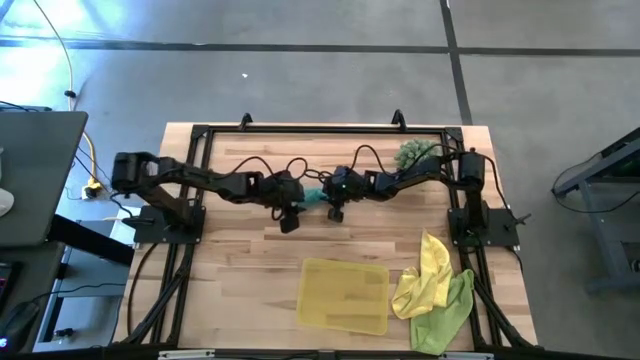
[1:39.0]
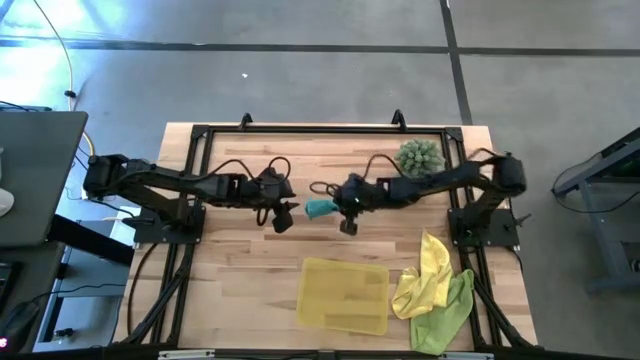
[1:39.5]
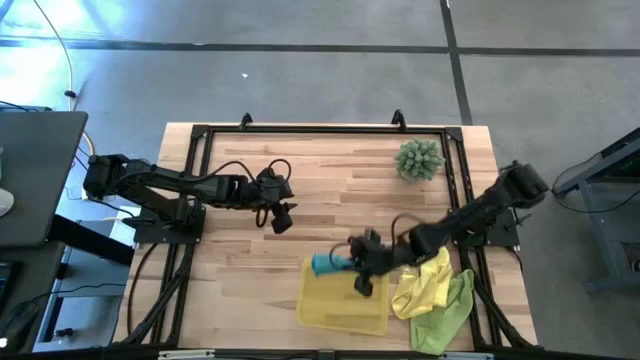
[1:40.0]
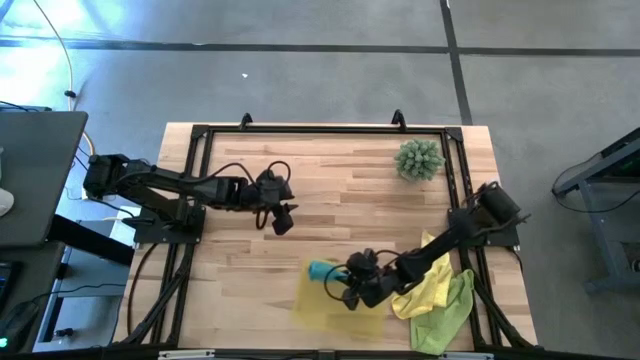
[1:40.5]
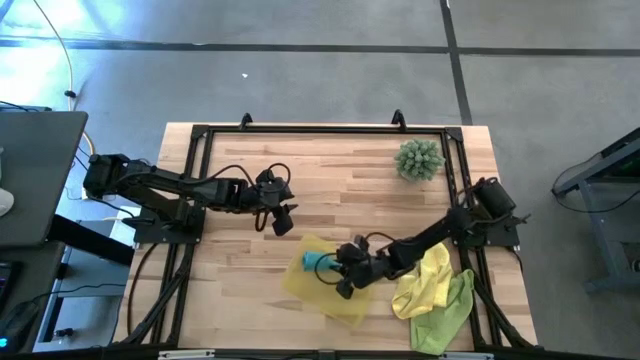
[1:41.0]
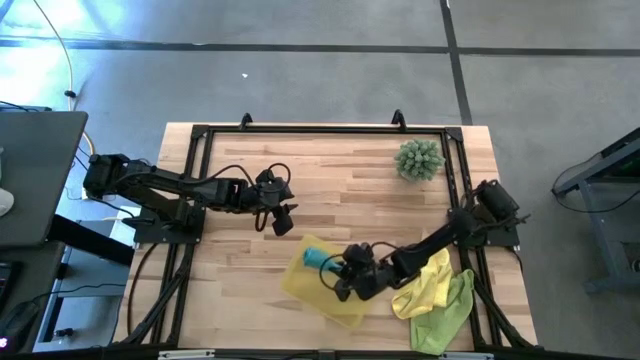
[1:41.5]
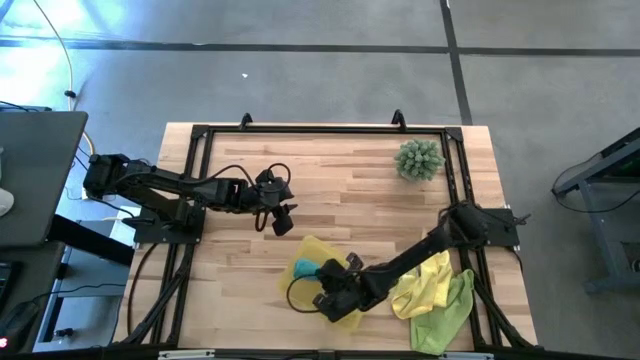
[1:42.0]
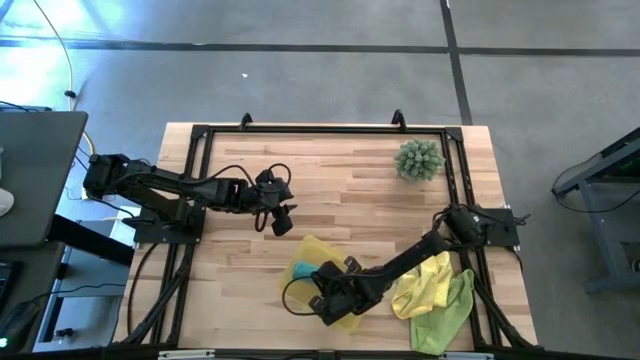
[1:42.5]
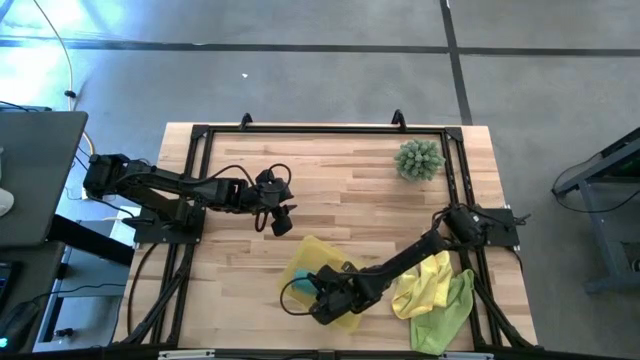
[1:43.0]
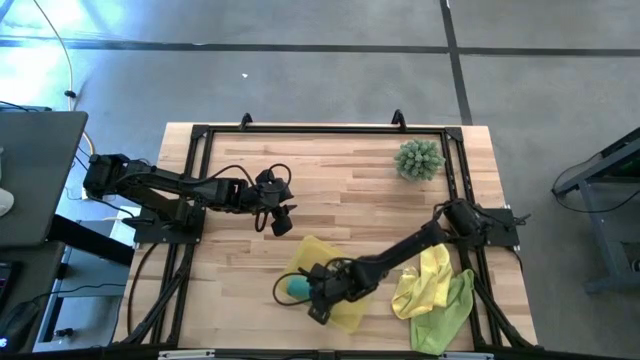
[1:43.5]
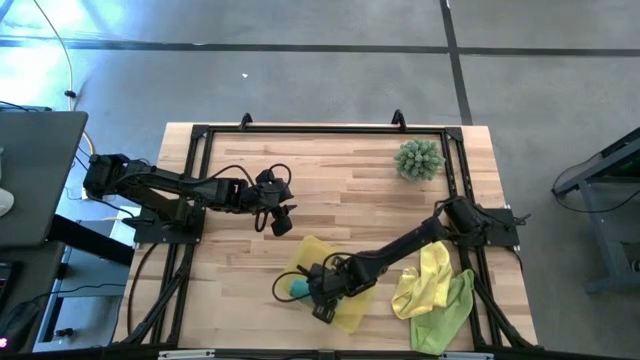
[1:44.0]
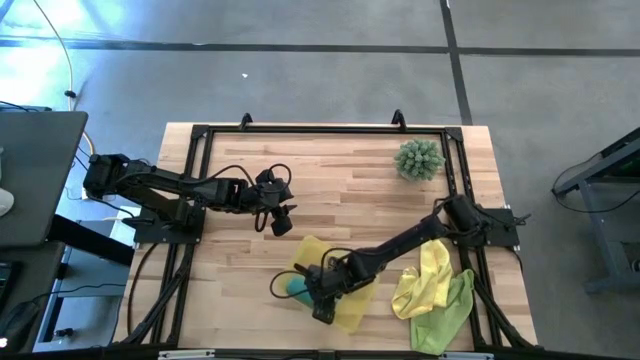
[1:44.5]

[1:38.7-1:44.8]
Task: Roll microfiber towels into tight, uniform cylinder then place into a basket
Put the rolled blue towel into the yellow bin

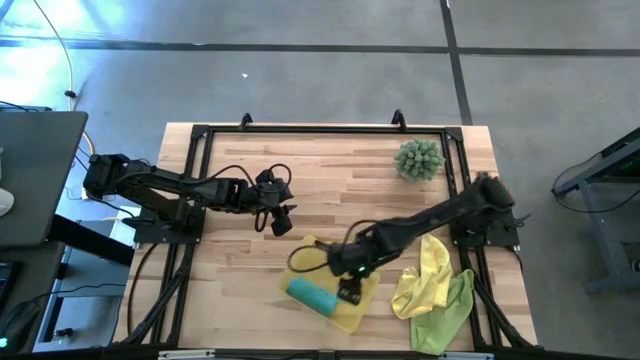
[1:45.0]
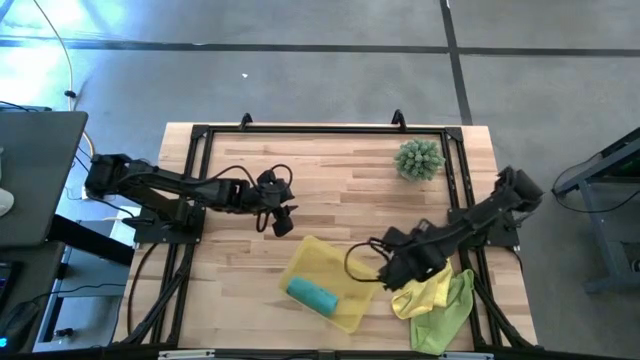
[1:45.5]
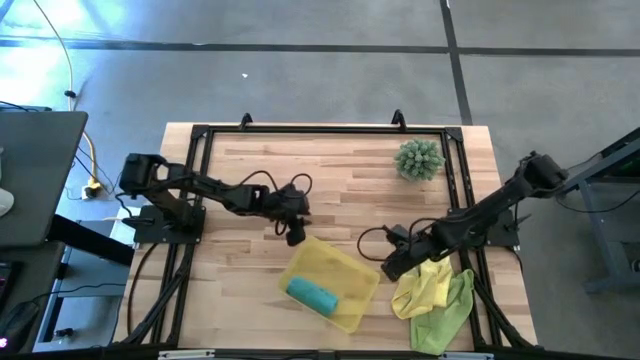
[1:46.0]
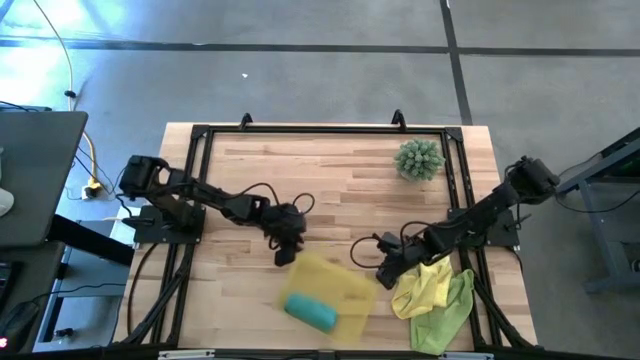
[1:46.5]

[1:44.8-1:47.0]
Adjust the yellow bin

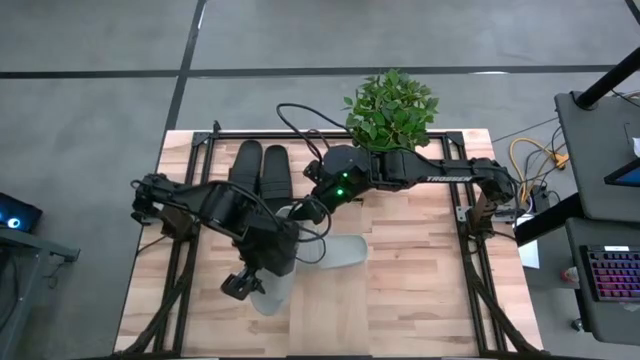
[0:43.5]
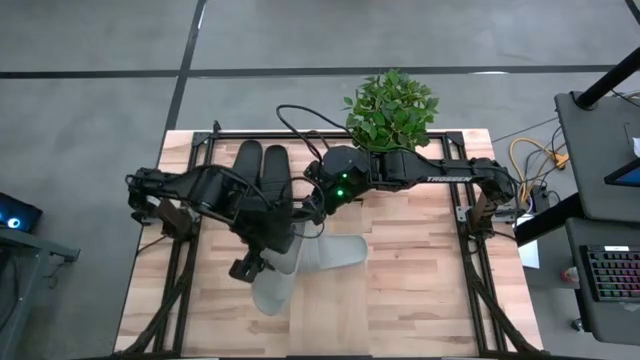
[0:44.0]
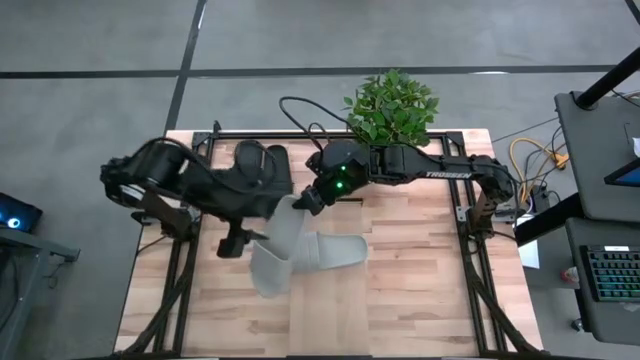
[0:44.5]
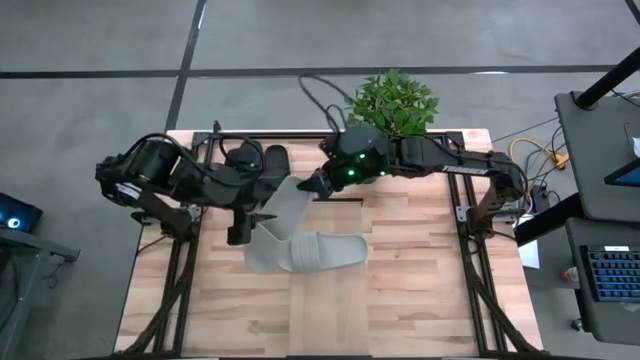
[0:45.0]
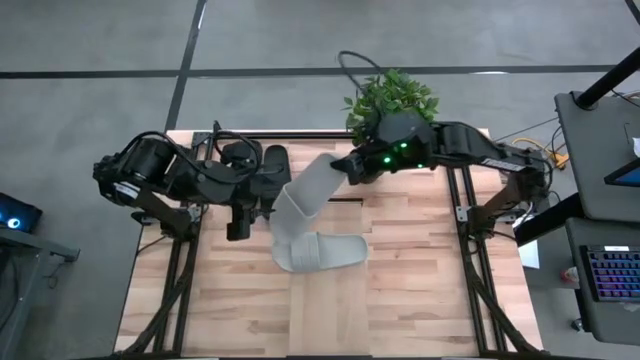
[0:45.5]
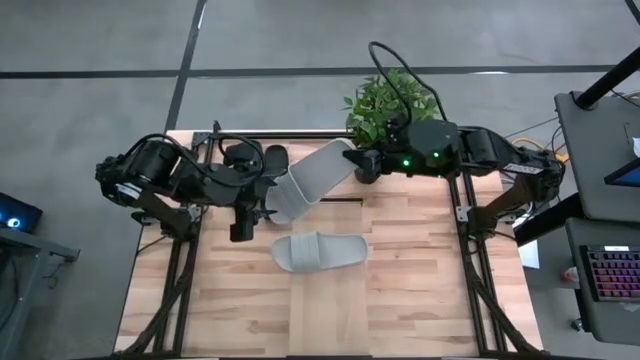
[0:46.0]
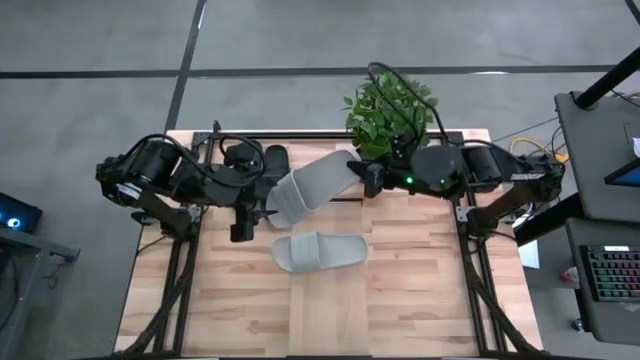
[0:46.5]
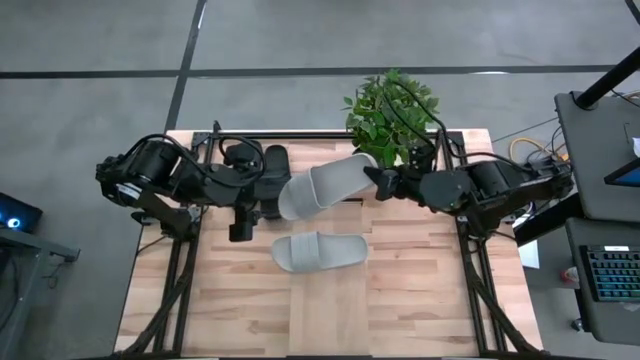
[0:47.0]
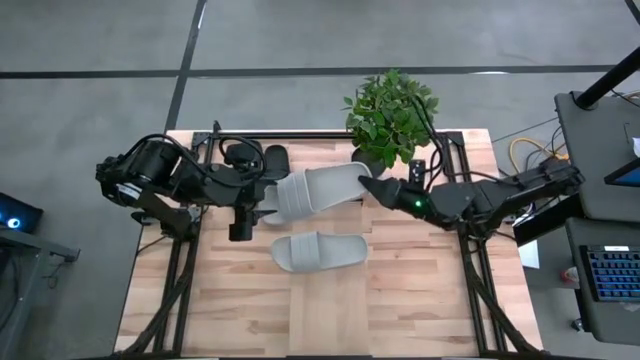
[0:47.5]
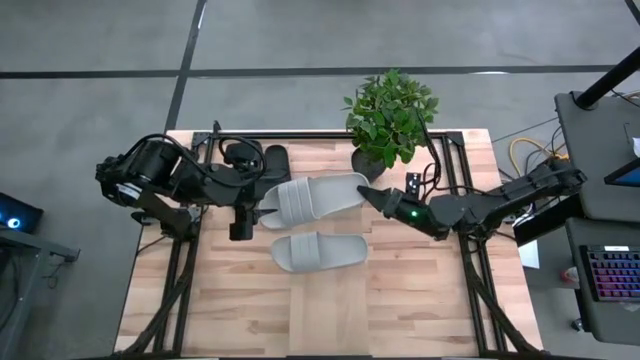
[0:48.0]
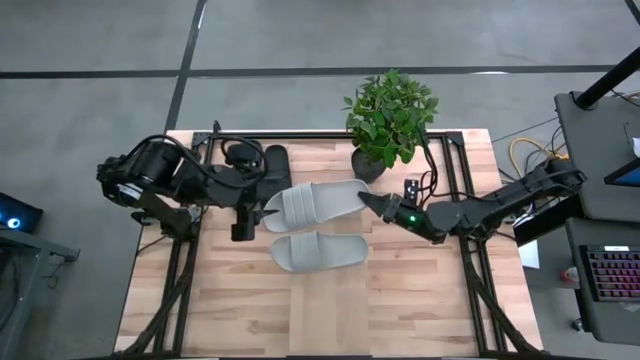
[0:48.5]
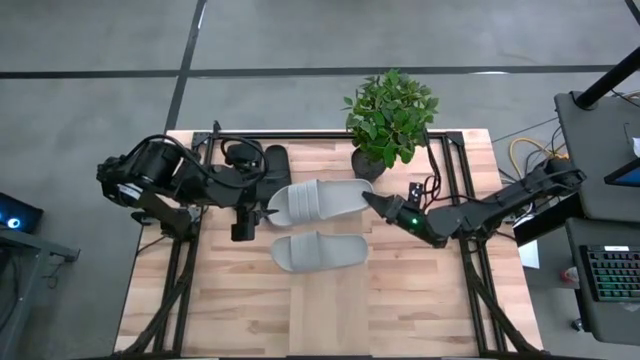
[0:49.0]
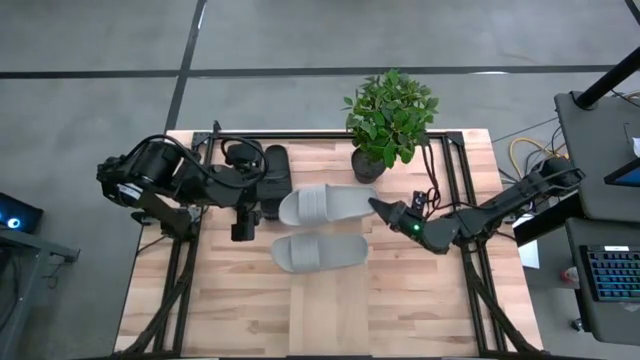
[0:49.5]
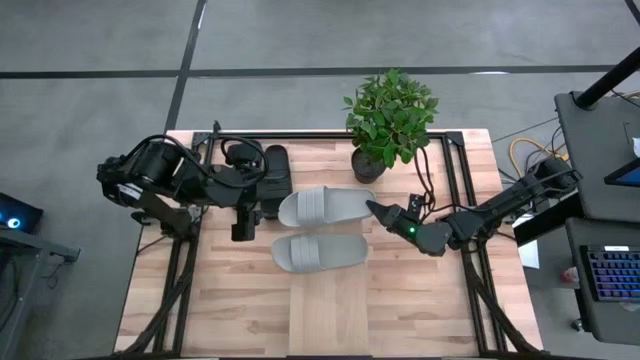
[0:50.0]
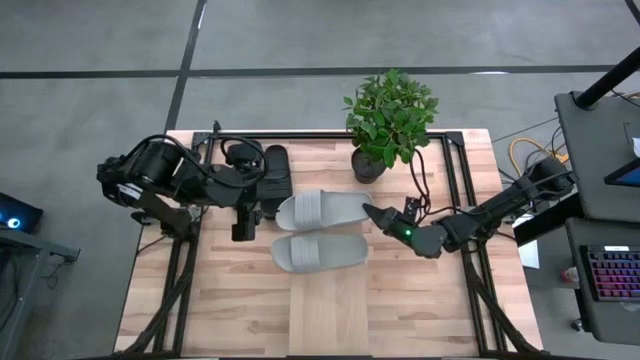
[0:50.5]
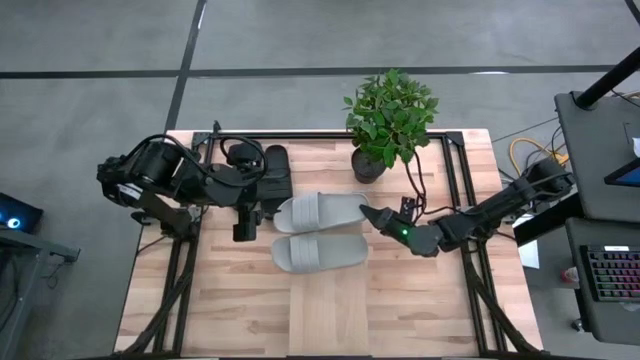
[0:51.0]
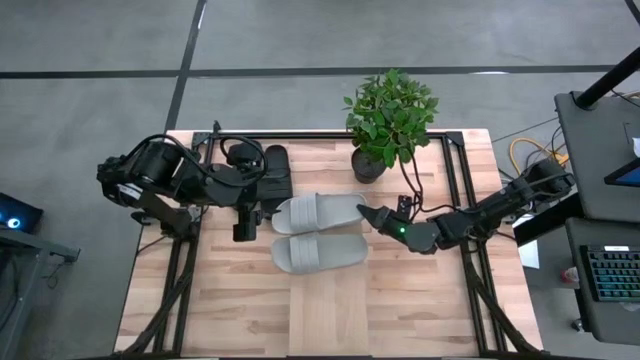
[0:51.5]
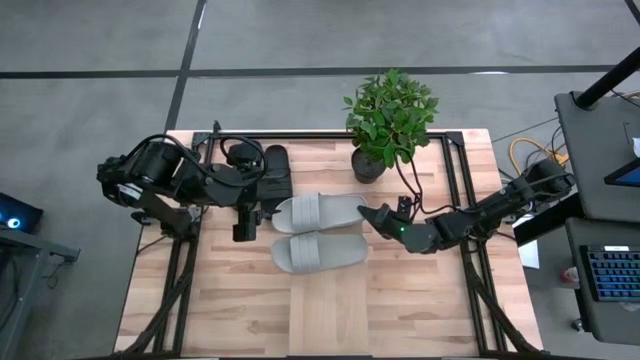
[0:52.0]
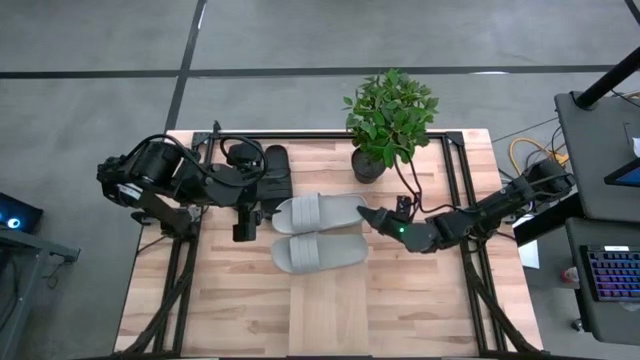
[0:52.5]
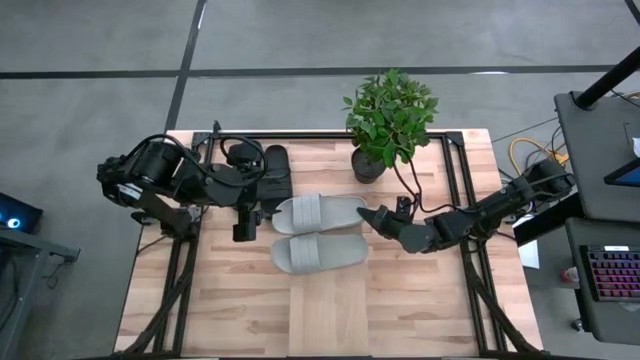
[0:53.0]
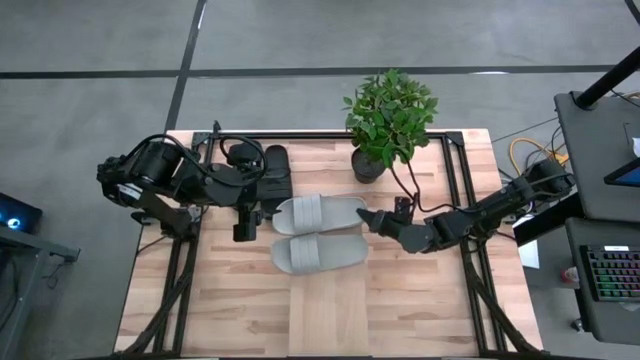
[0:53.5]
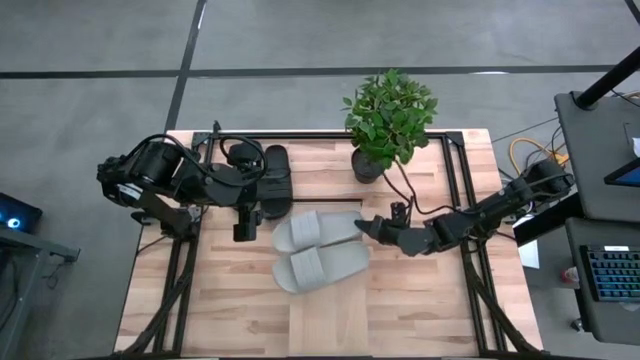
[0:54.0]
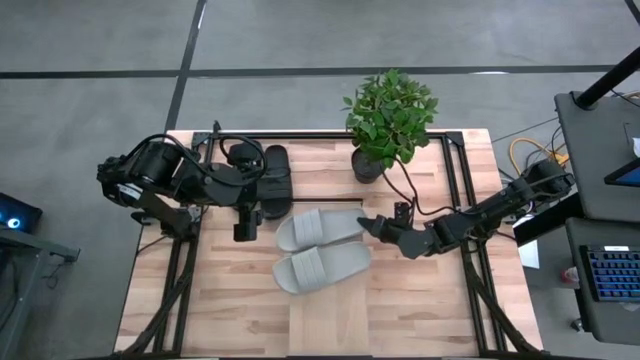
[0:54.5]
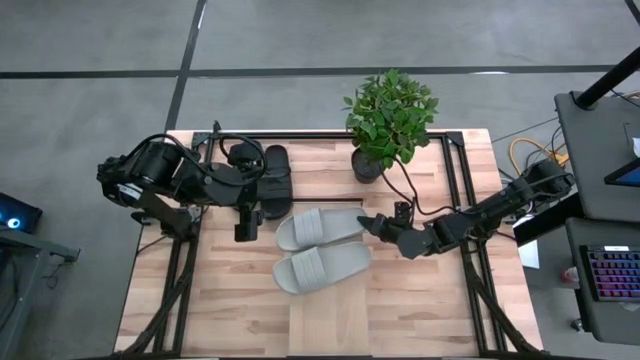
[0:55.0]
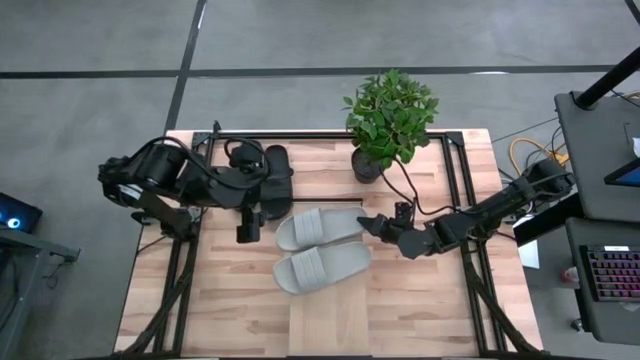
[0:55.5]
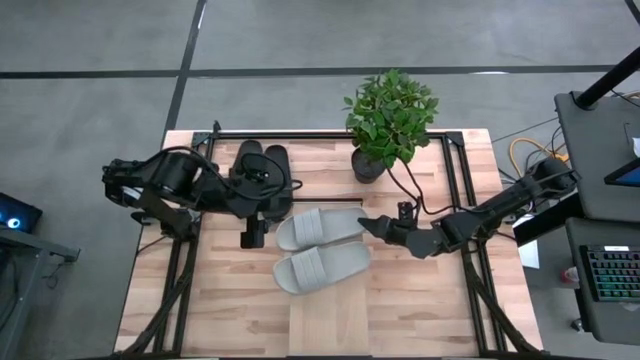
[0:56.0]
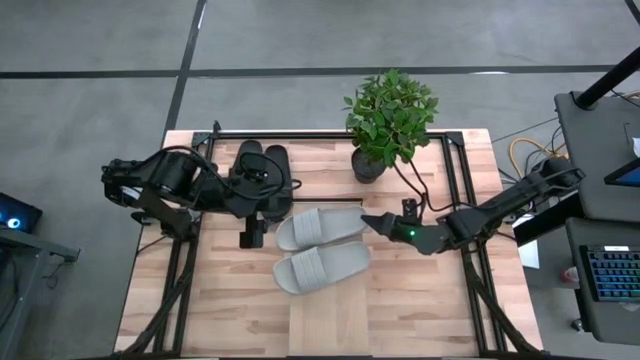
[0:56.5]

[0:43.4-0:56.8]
Task: Pick and place slides into the shelf
Put the gray slipper on the shelf
